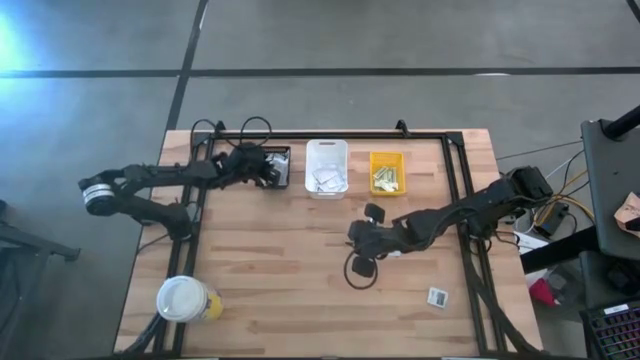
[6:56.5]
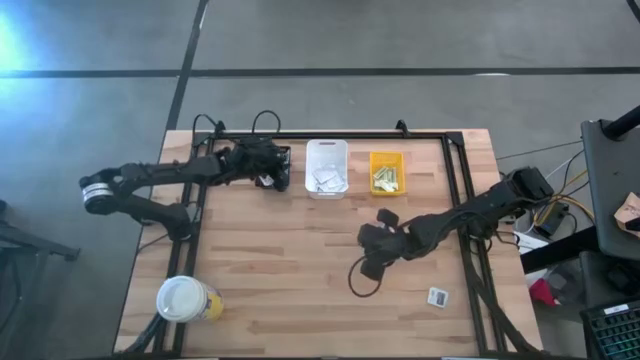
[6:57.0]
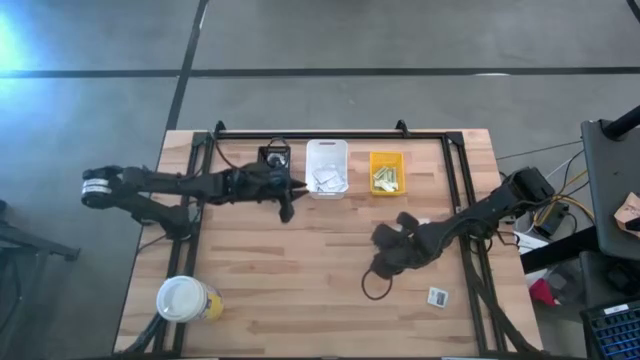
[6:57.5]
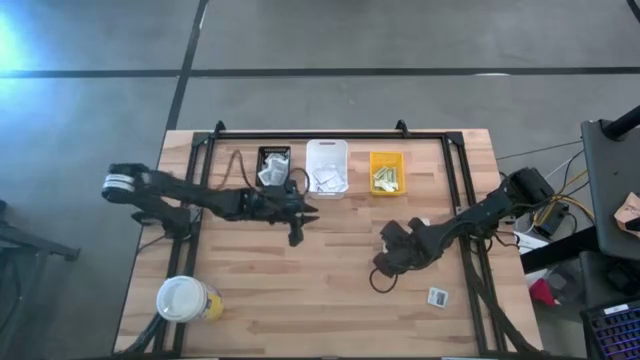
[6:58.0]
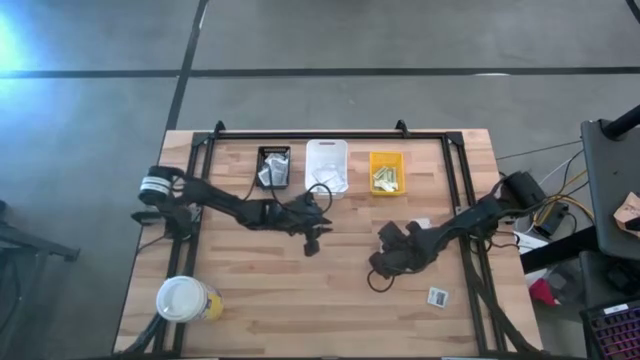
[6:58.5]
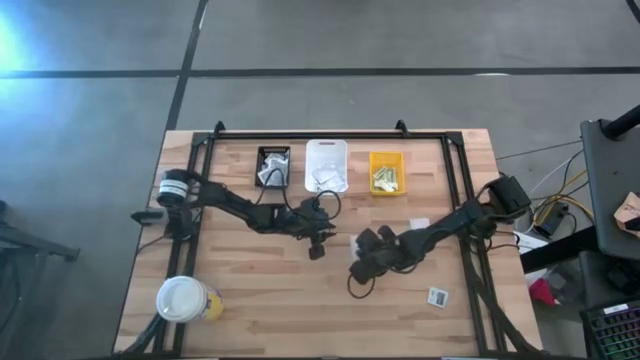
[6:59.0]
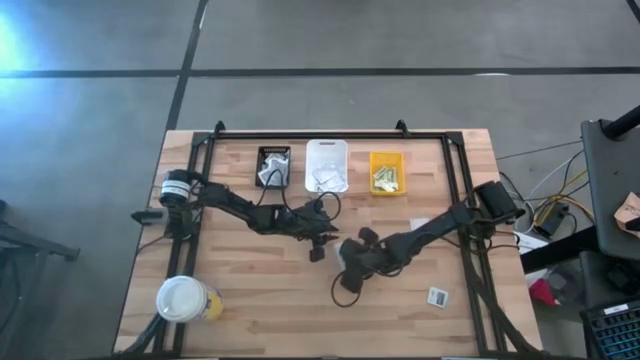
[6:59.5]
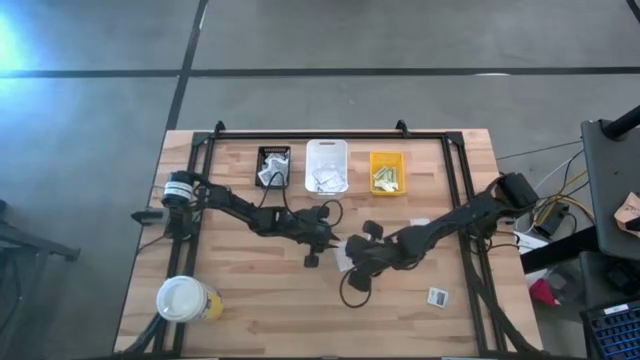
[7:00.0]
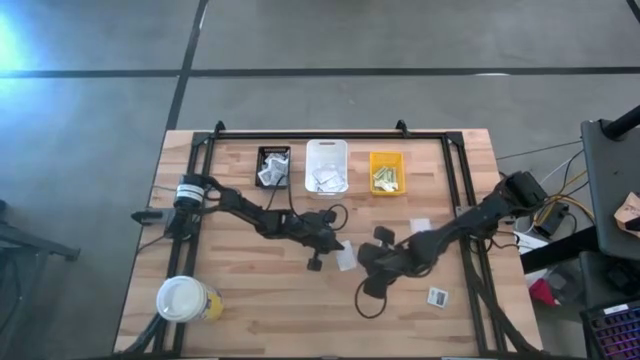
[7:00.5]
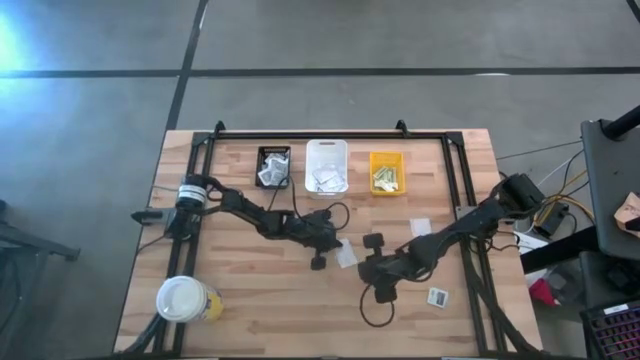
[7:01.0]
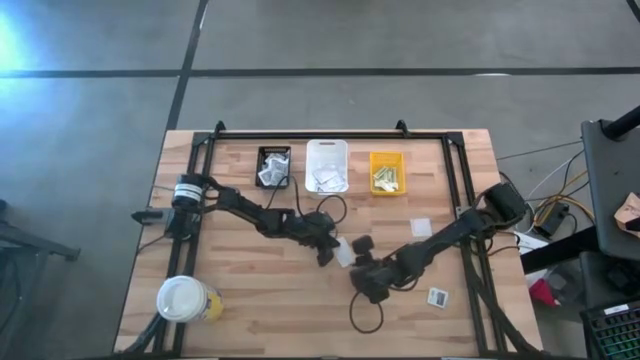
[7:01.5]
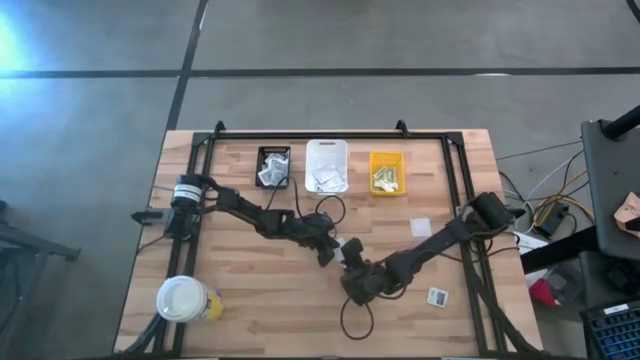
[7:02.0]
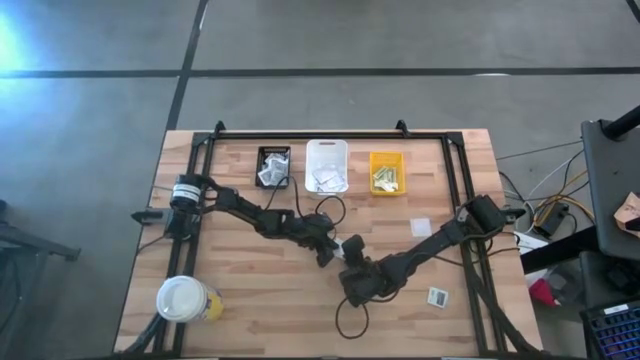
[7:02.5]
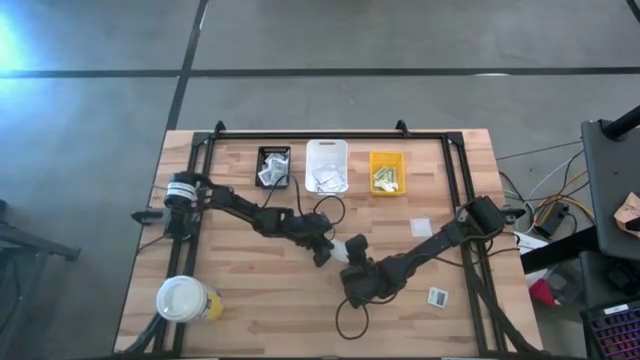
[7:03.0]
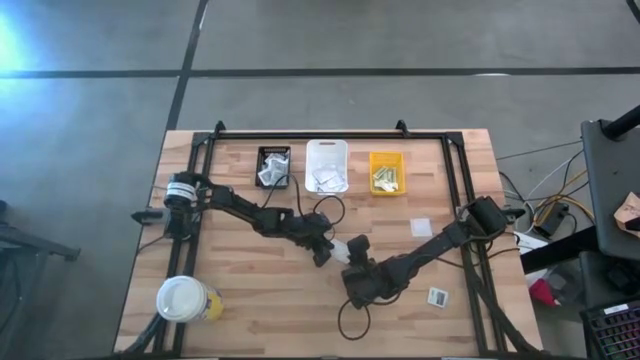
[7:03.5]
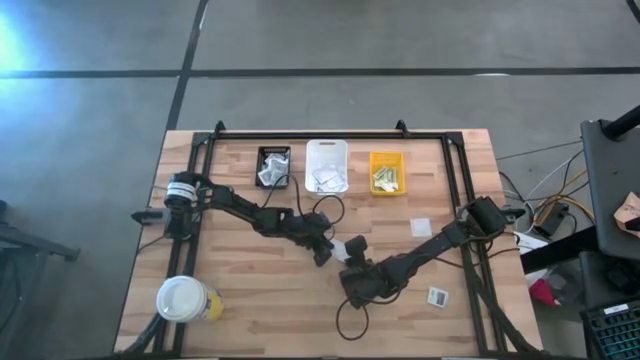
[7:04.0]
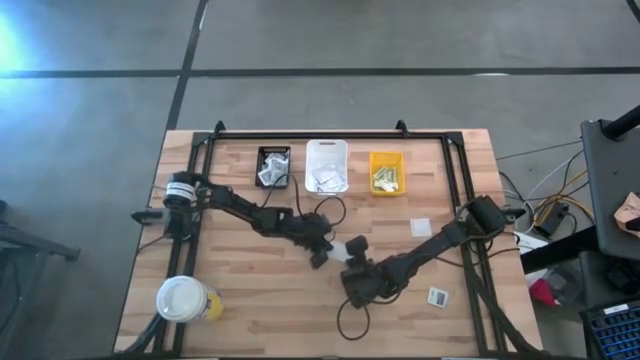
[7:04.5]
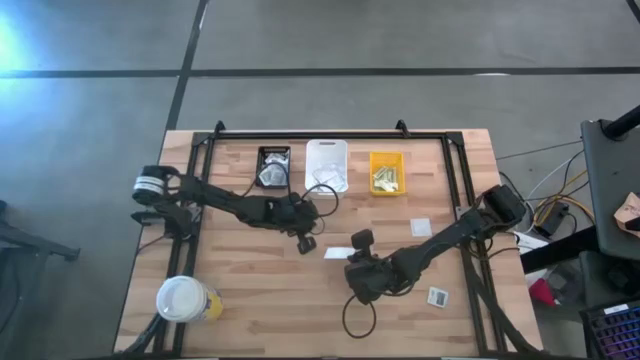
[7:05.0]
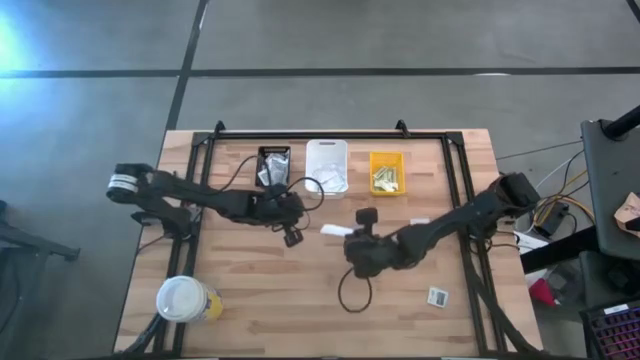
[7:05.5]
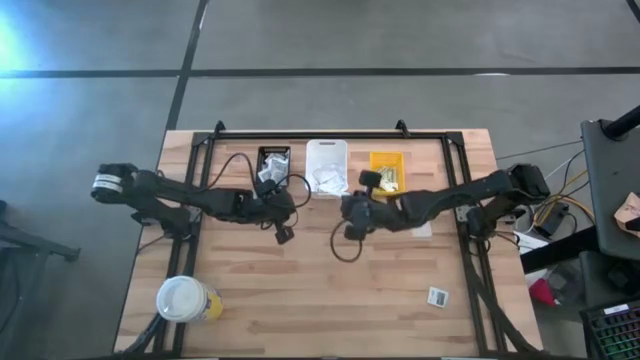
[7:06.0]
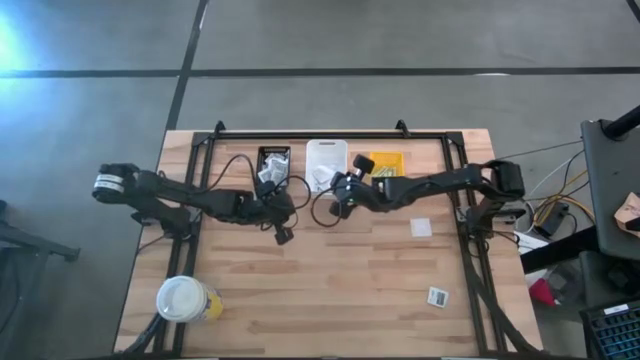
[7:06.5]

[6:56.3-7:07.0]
Task: Pick & Place First Aid Supplies
Put the blue bandage into the white bin

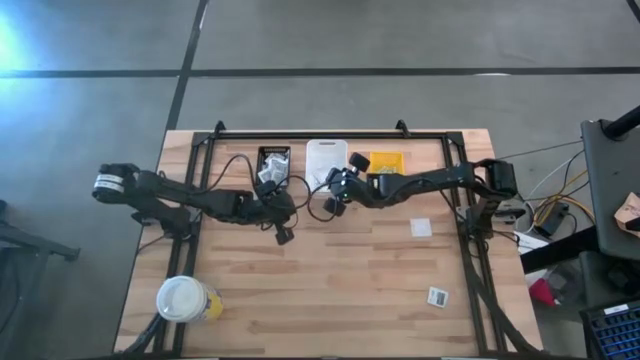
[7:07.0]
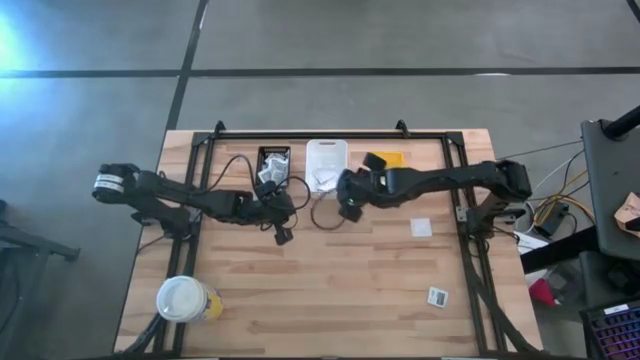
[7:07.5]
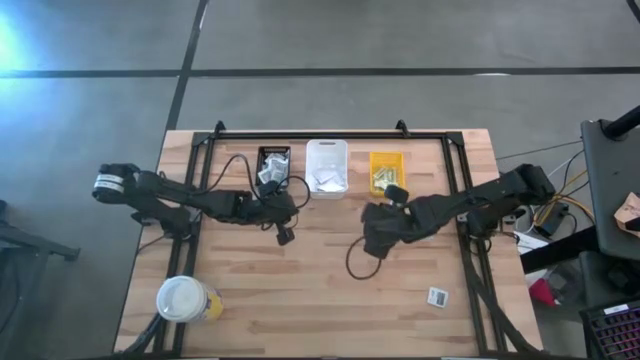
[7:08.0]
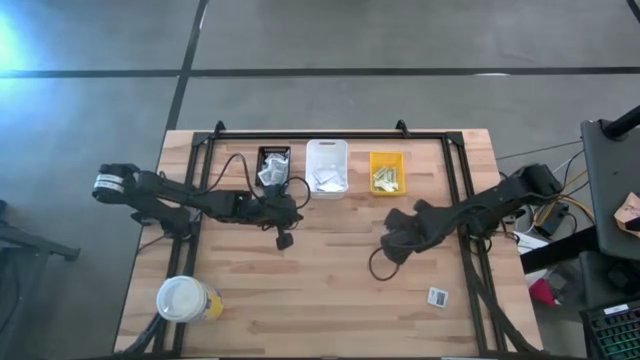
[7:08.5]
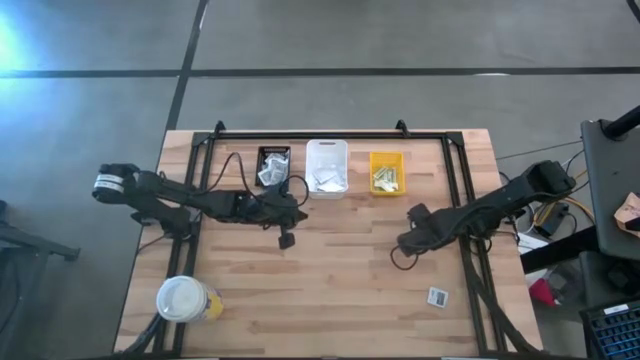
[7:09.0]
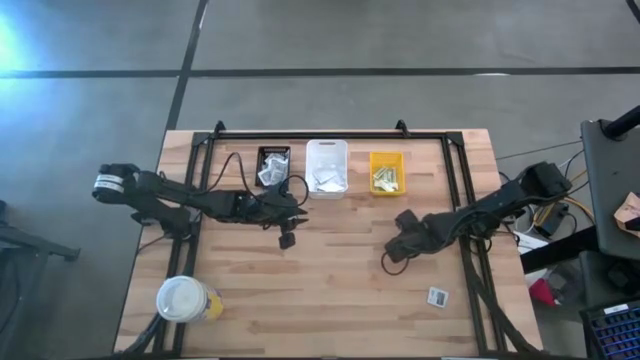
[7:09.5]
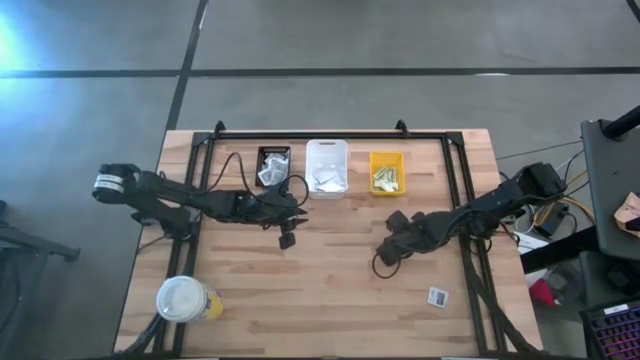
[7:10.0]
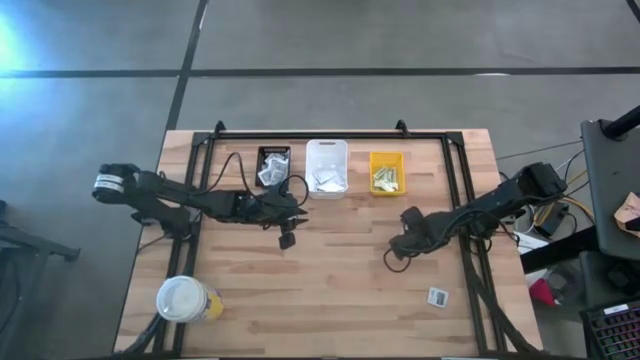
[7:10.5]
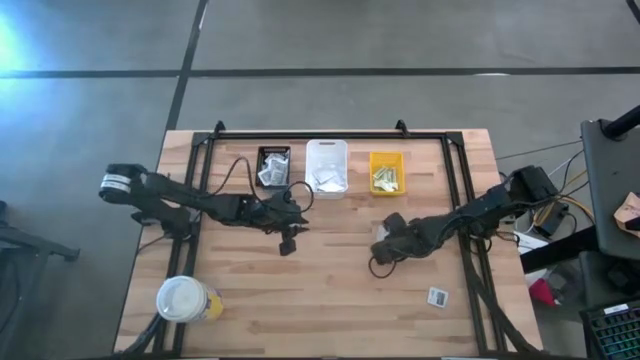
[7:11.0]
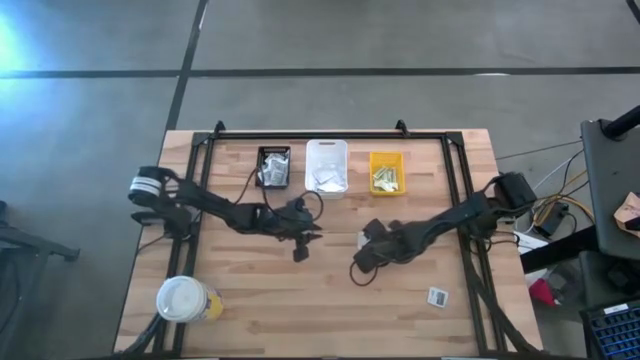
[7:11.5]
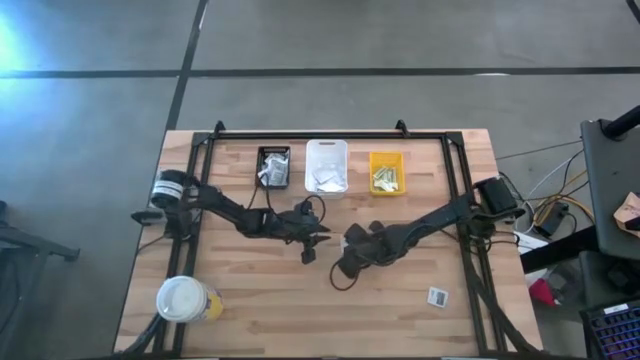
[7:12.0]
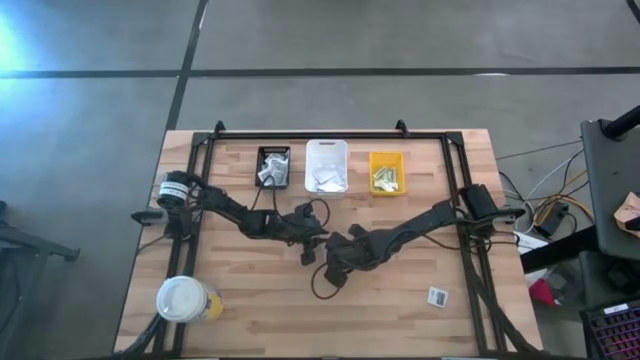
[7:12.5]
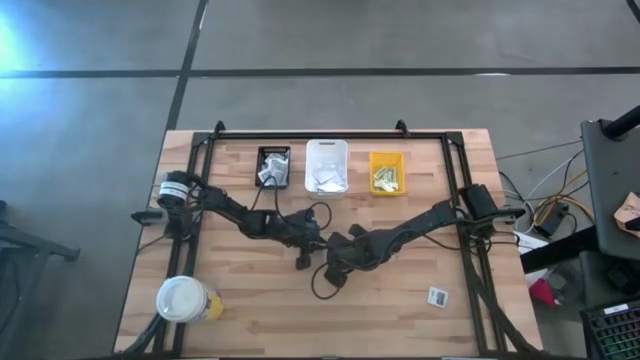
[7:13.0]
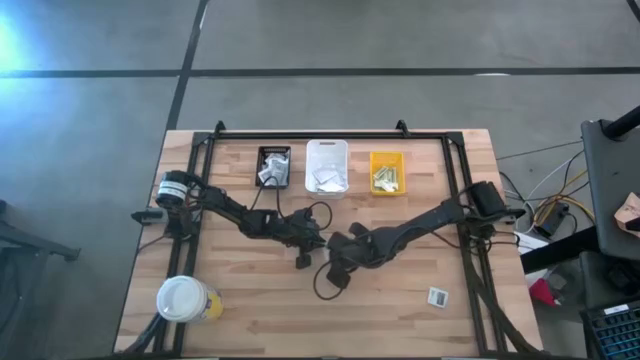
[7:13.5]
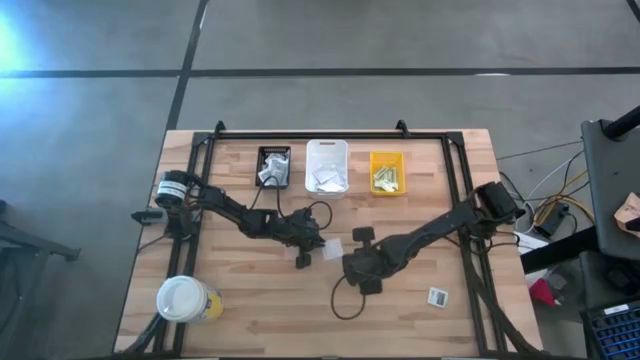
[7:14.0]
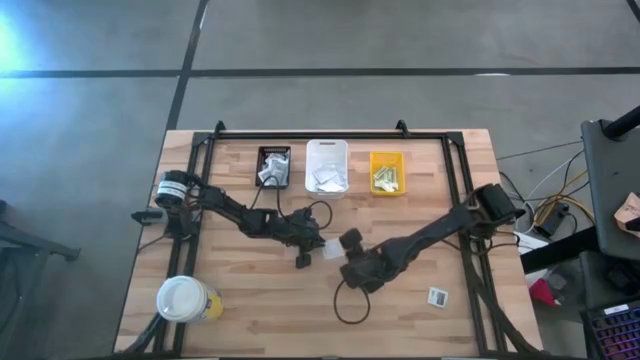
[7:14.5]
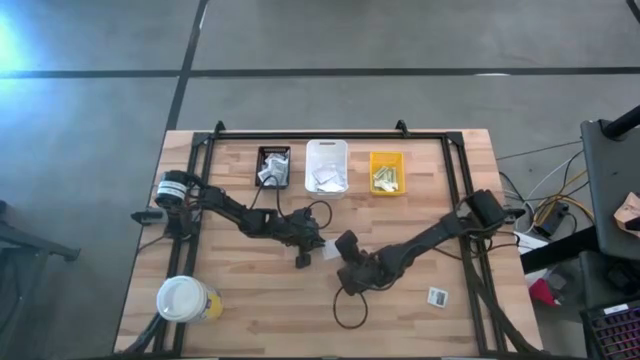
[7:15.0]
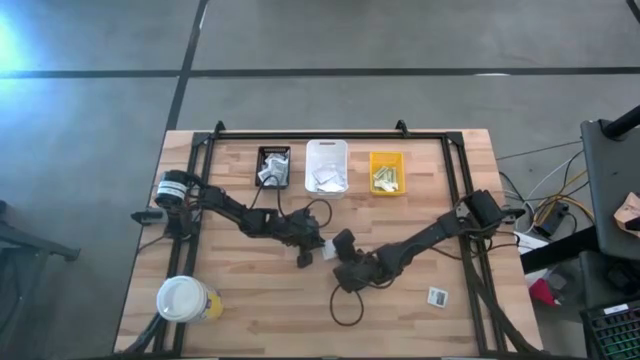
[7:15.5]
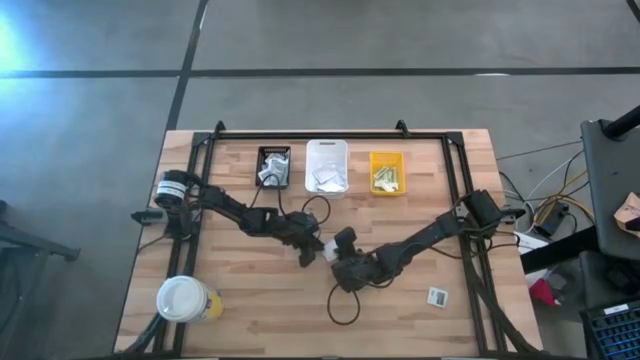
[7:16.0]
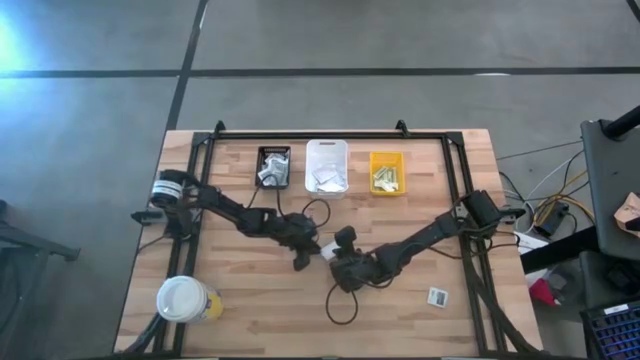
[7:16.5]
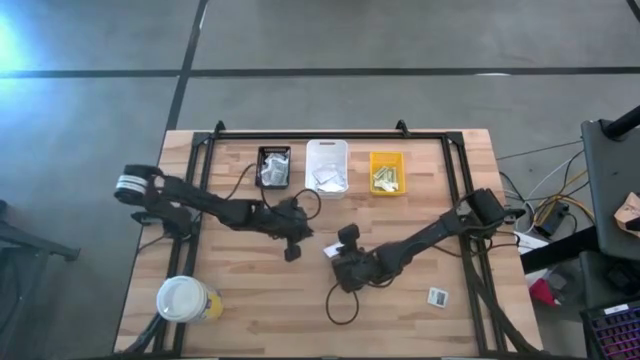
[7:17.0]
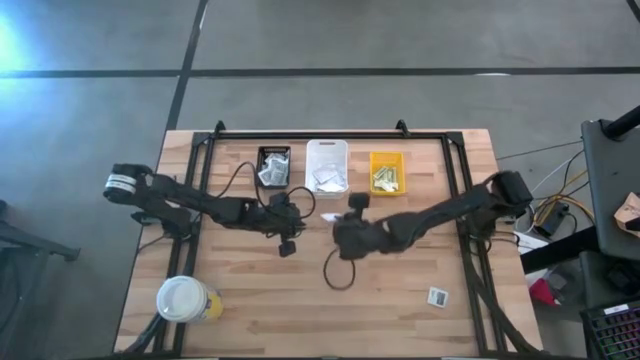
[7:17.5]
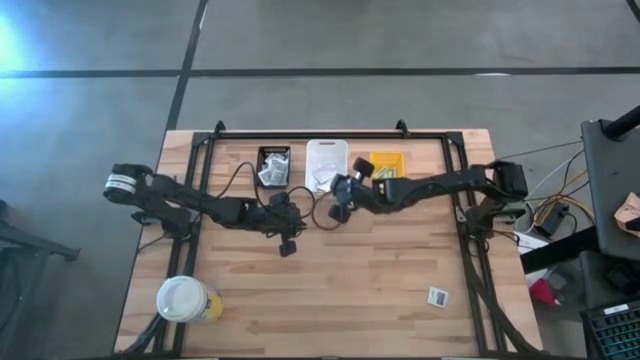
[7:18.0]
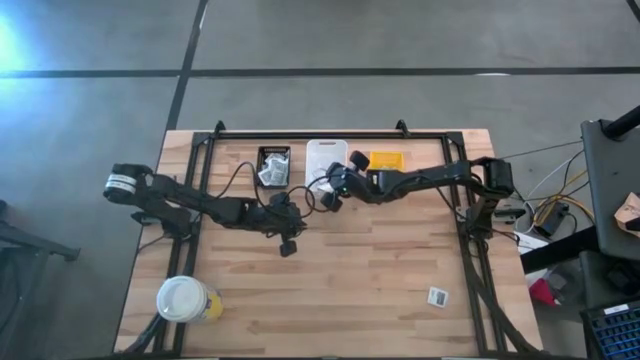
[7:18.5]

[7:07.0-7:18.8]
Put the blue bandage into the white bin
